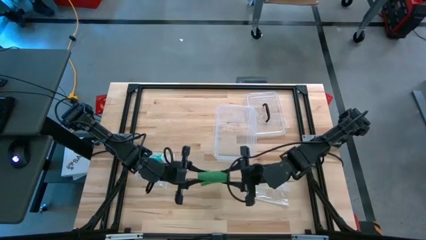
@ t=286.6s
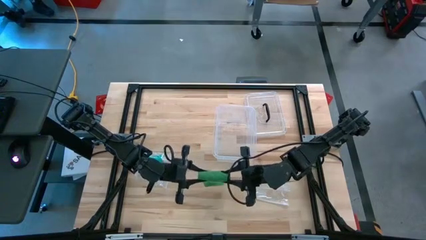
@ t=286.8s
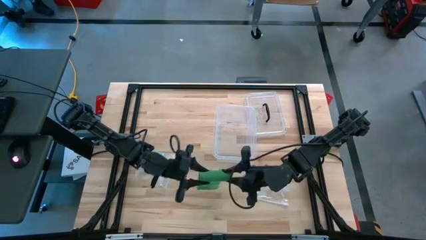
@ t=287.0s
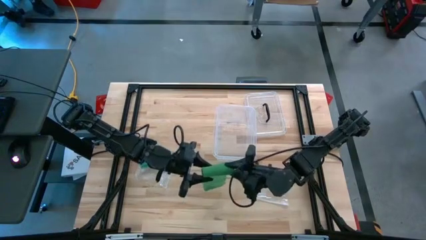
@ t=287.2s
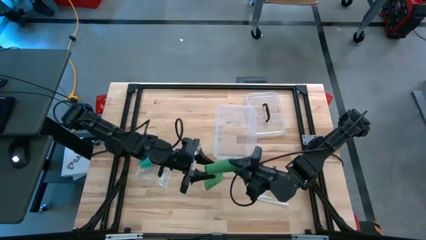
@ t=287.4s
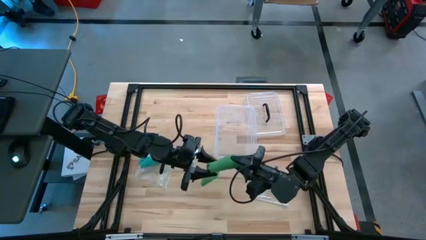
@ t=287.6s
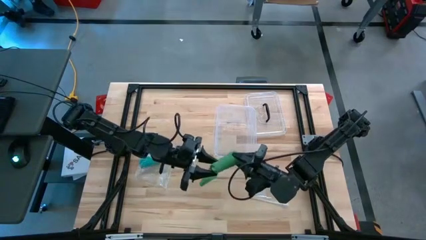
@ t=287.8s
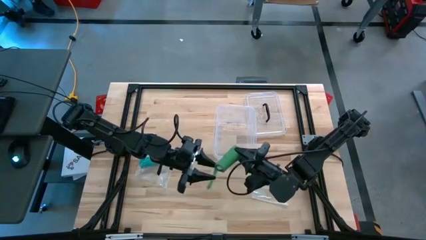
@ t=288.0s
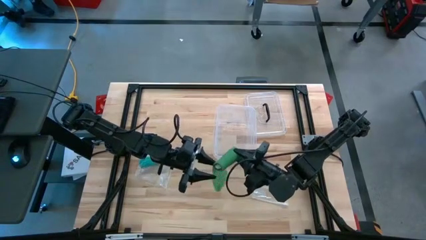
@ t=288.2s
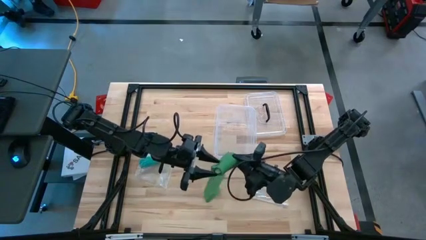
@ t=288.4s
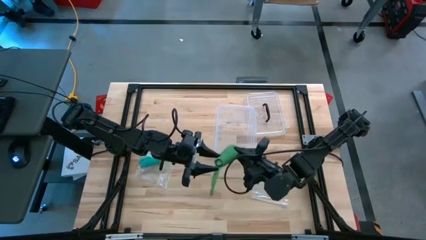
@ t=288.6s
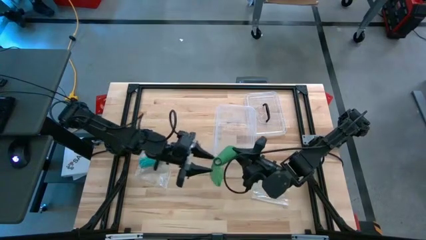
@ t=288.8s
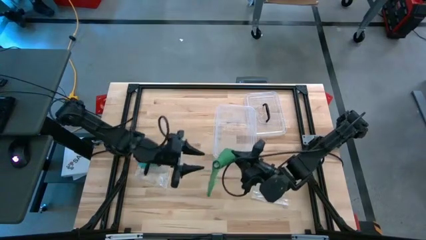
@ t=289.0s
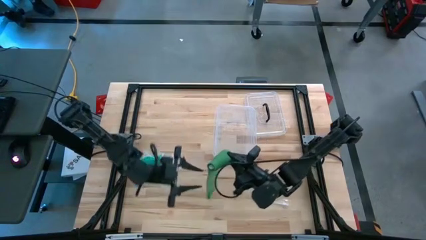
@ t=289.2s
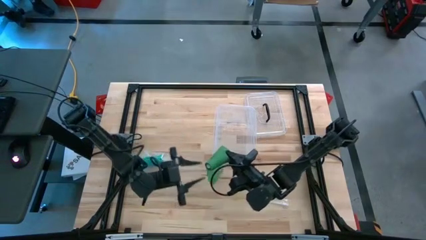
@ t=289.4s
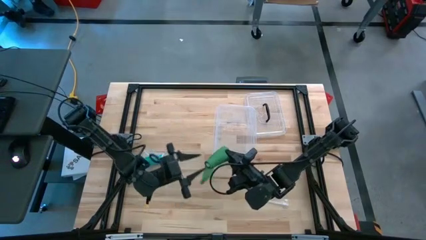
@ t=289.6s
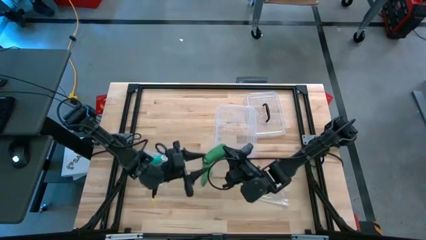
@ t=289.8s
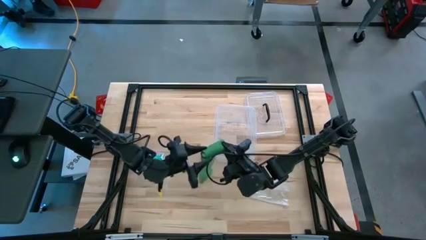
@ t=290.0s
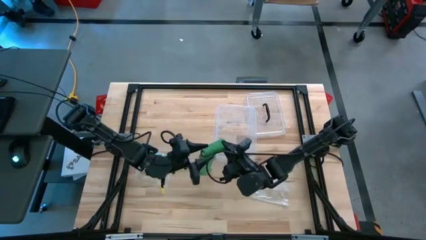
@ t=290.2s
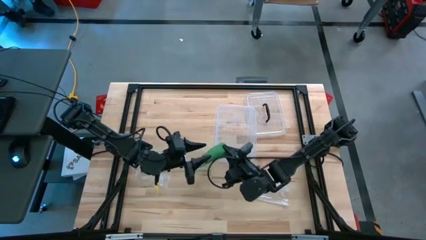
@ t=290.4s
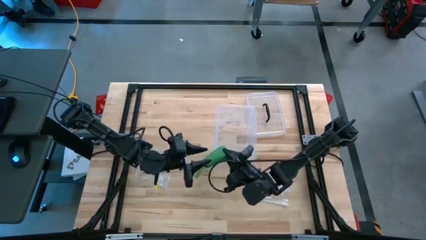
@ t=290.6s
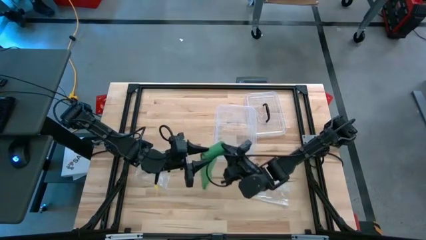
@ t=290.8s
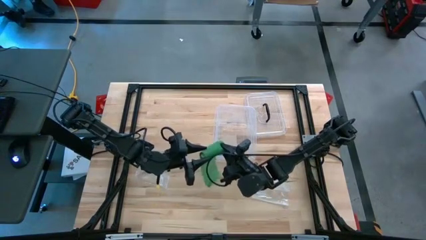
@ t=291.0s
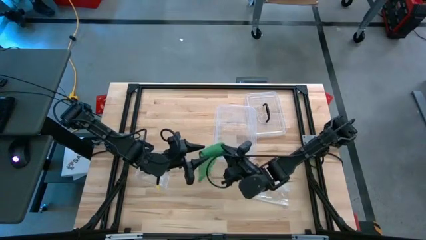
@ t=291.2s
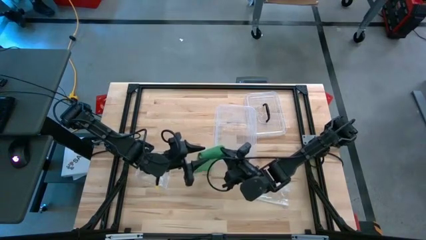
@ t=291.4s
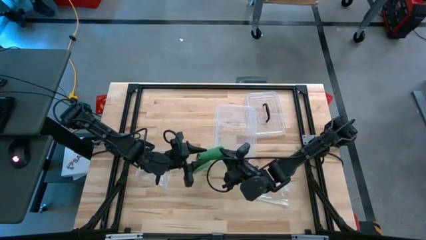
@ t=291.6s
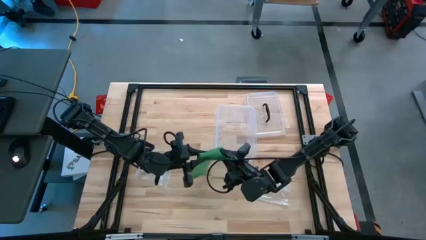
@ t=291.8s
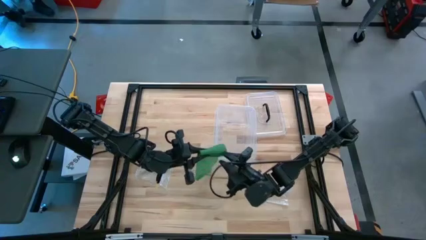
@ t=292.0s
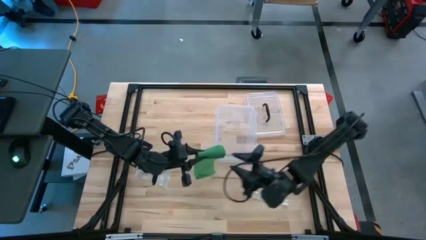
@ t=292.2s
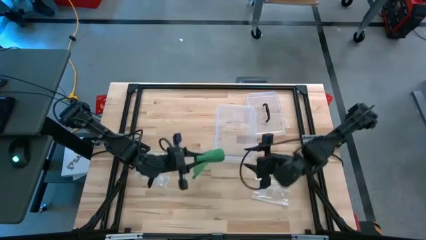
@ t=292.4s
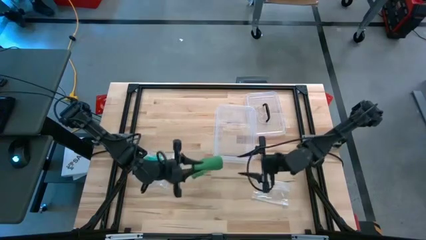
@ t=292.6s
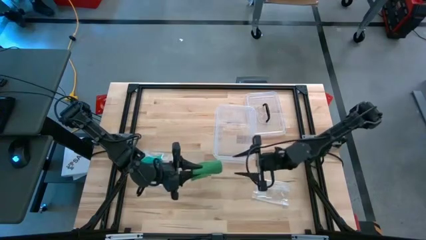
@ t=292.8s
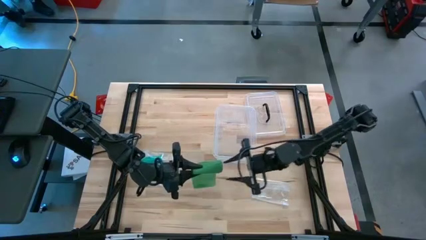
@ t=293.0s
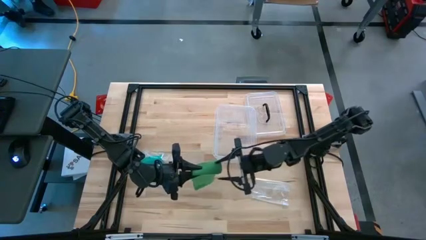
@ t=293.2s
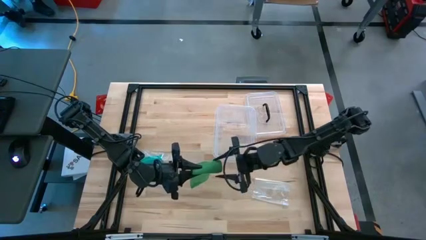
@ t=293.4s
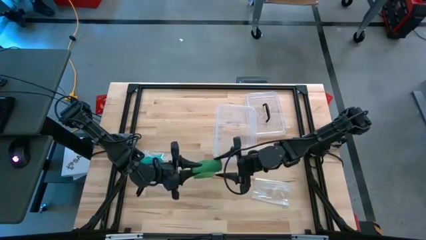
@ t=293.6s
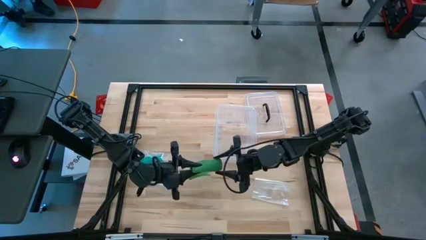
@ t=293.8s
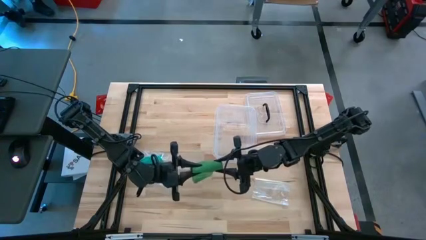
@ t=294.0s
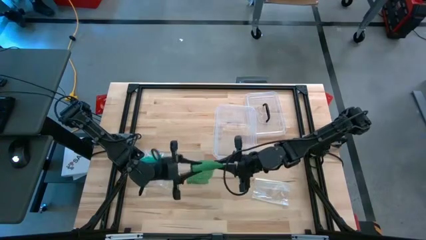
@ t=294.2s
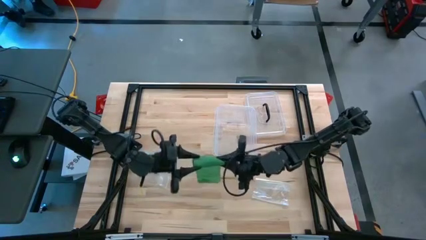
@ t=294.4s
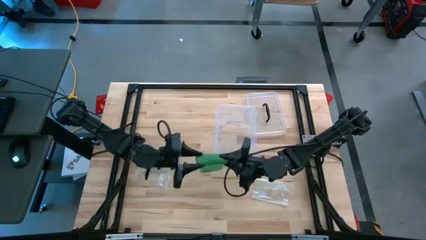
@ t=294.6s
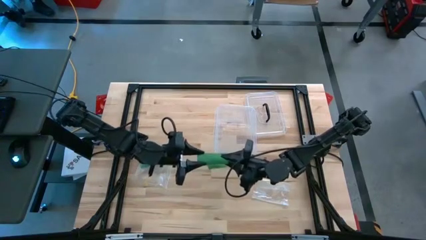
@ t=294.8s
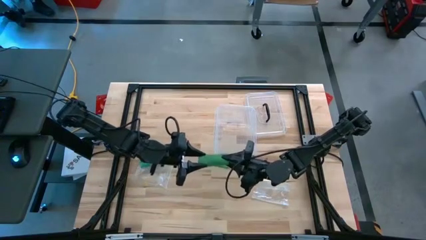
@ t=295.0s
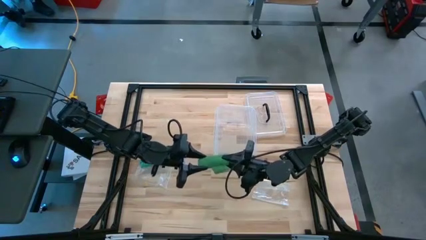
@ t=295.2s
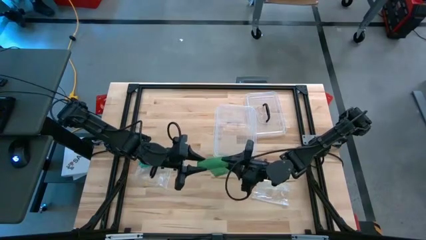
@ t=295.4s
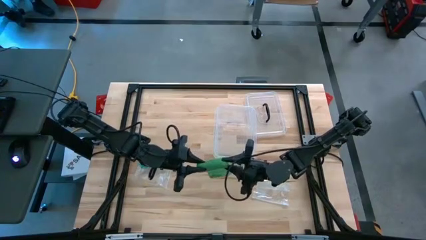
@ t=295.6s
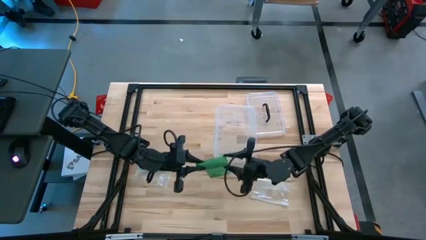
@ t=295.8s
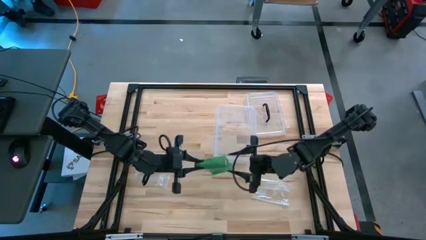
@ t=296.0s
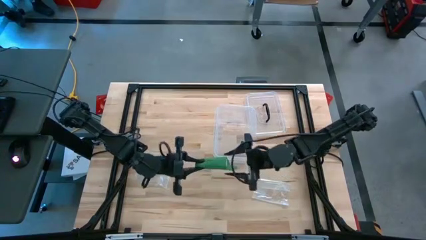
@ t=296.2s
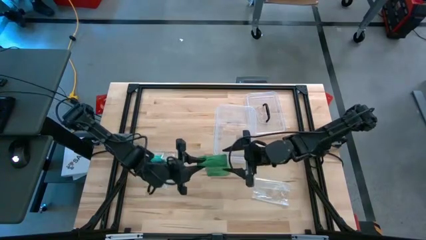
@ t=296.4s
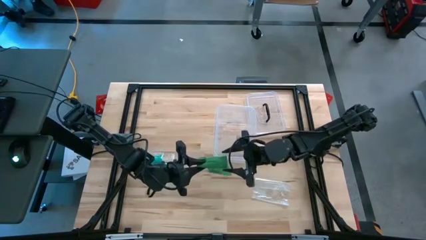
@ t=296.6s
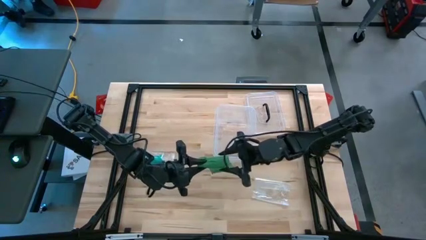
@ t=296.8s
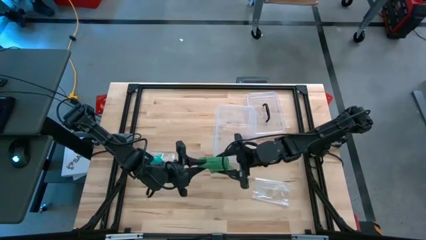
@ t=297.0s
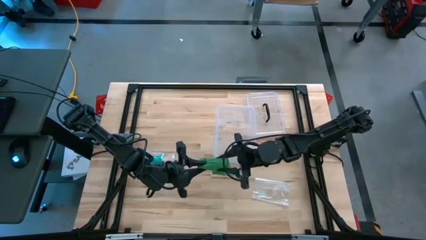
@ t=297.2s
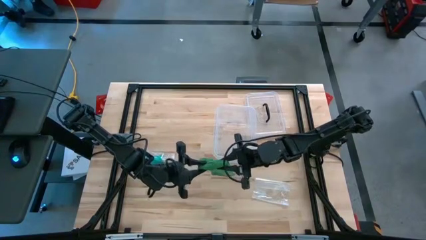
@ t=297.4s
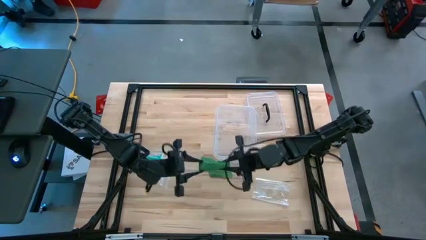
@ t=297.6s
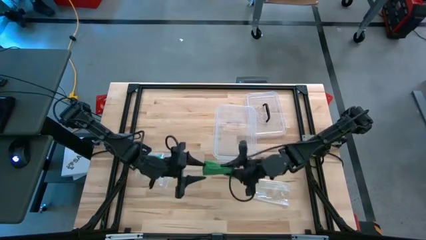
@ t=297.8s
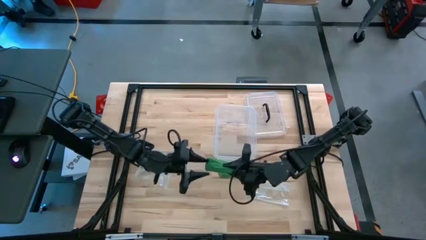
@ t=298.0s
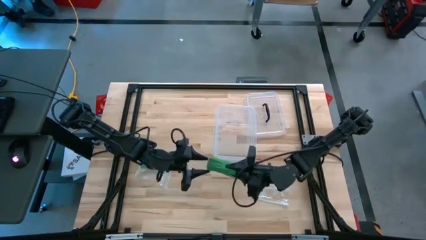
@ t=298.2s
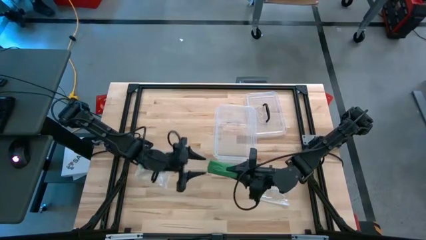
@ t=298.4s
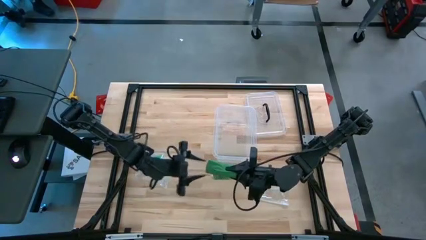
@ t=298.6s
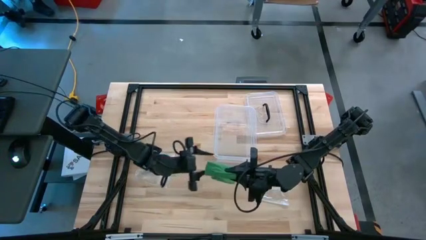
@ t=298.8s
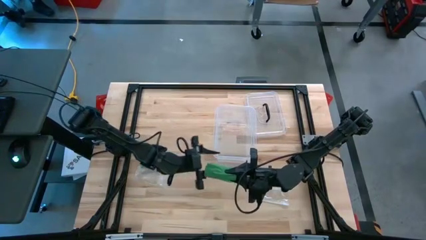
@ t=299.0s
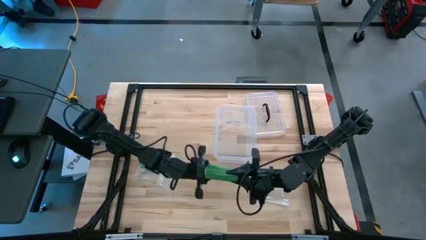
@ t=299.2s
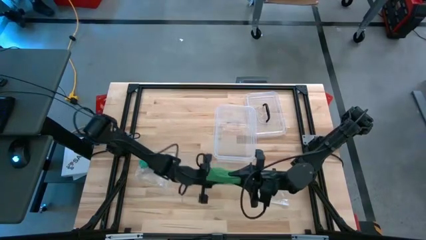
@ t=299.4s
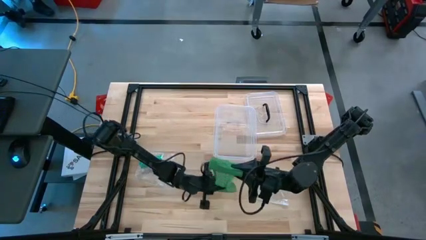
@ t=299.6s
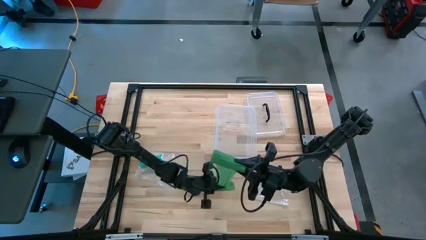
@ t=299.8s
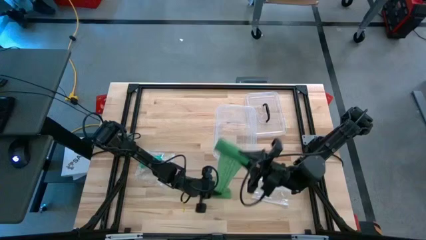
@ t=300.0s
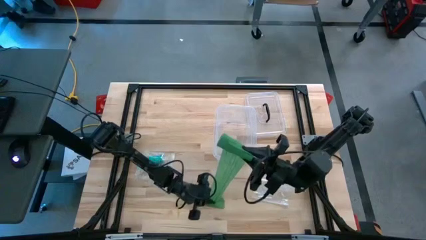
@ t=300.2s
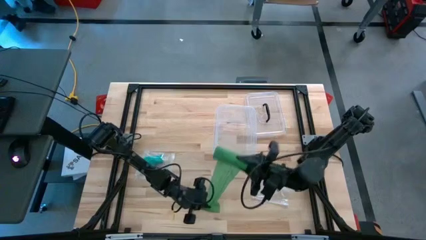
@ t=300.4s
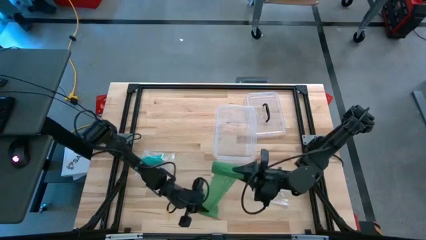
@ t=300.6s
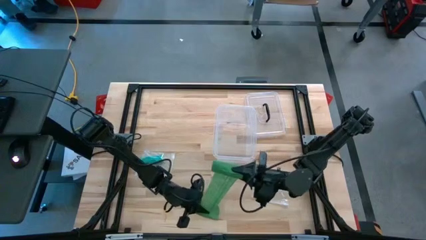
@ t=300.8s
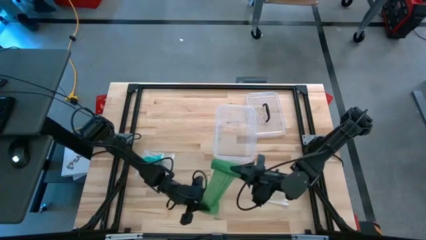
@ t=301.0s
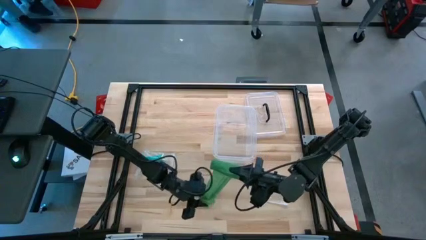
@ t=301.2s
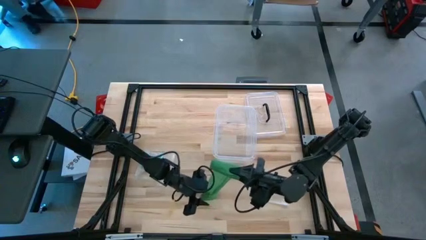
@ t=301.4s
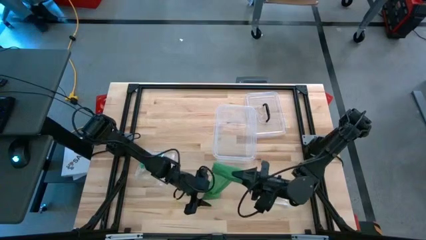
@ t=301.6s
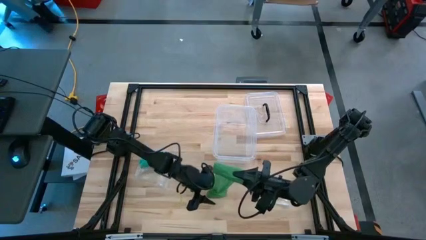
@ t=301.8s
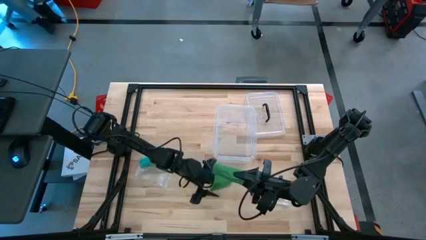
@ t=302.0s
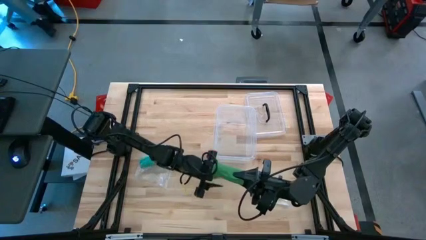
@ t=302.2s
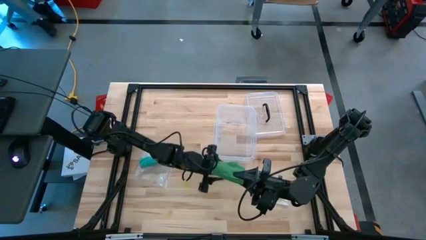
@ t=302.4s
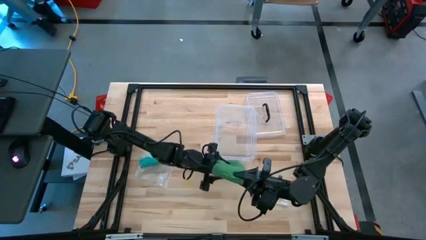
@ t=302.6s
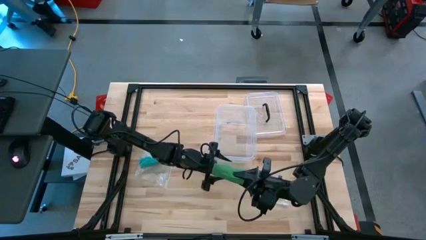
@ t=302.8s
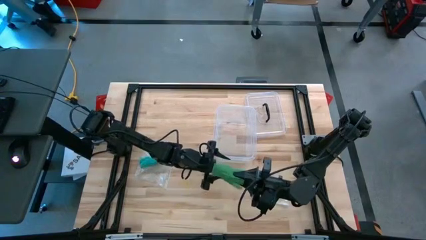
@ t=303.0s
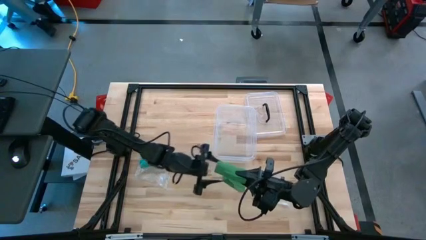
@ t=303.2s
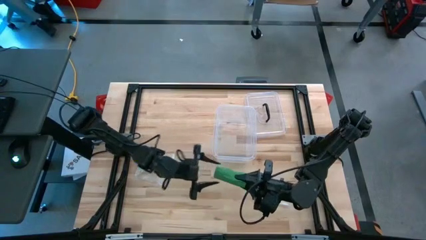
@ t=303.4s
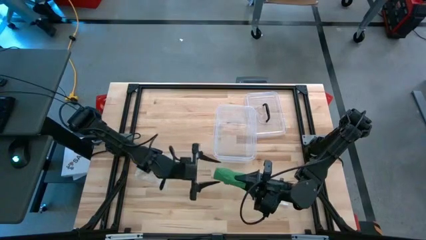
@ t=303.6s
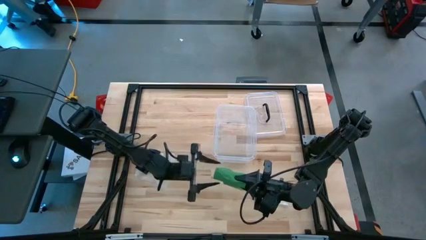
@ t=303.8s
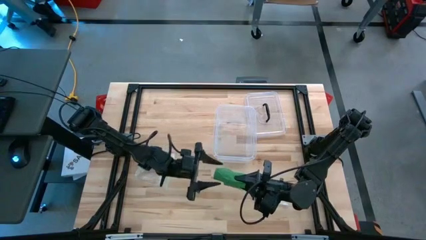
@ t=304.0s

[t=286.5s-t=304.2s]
Task: Roll bandage
Roll the green bandage
